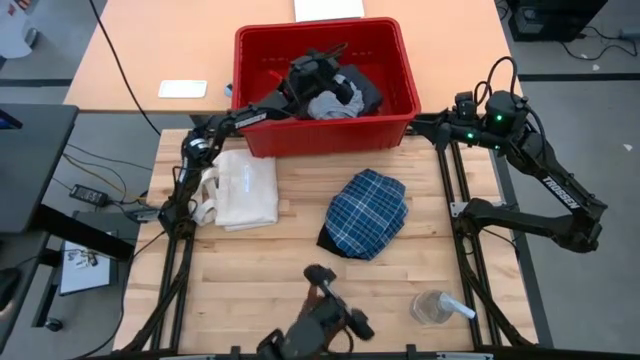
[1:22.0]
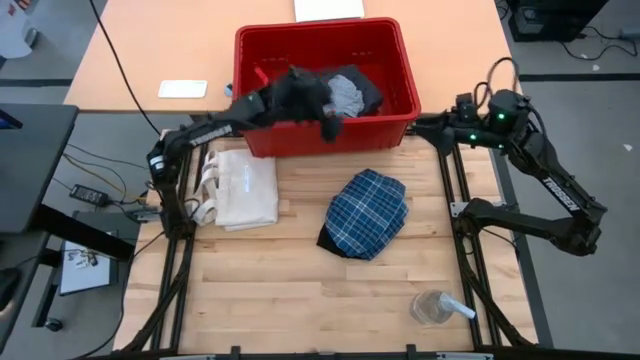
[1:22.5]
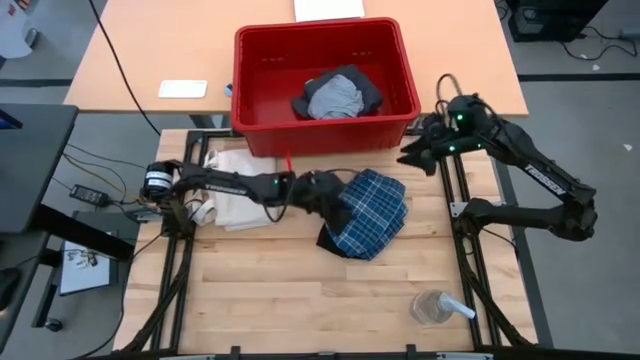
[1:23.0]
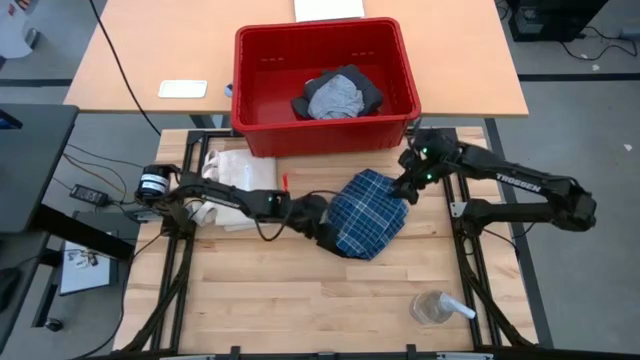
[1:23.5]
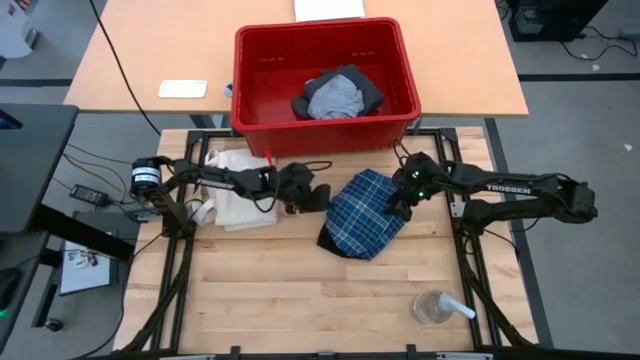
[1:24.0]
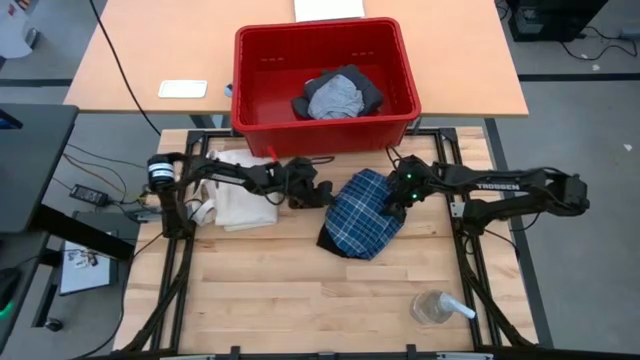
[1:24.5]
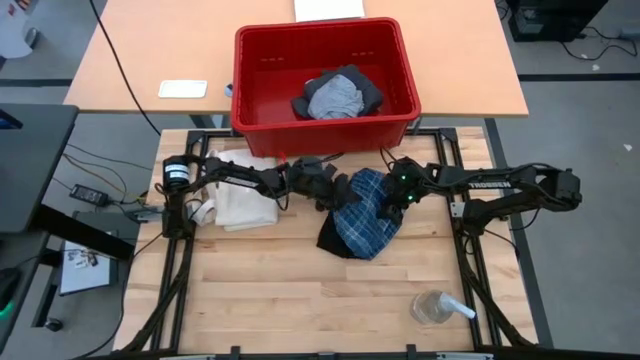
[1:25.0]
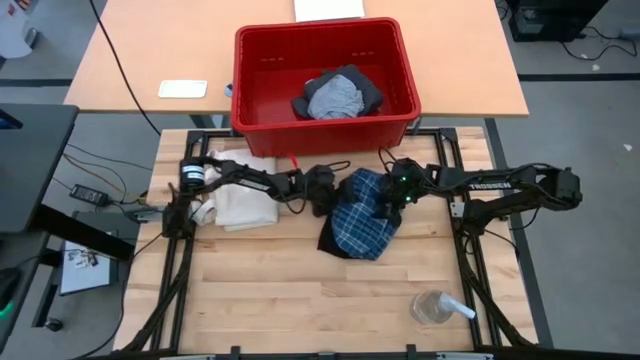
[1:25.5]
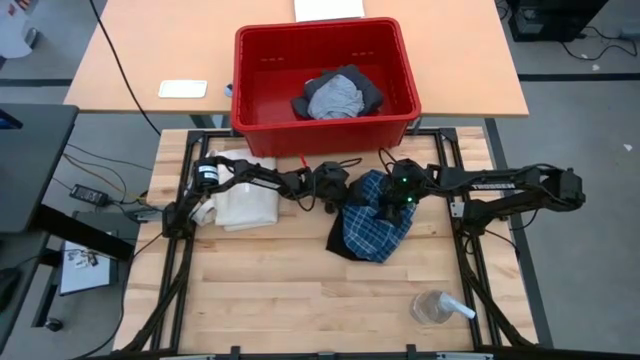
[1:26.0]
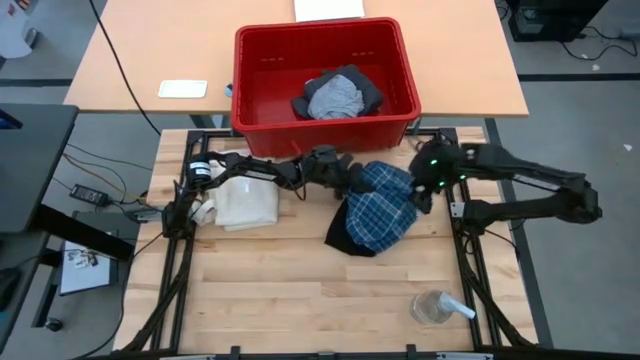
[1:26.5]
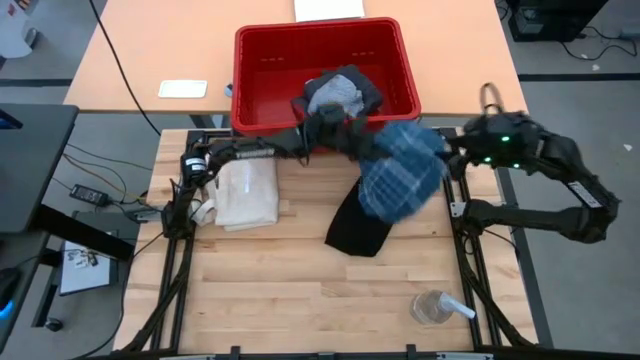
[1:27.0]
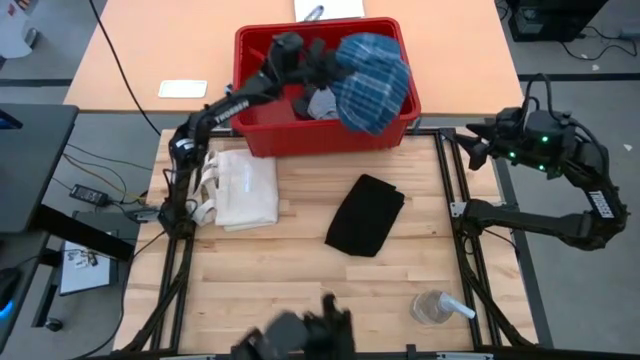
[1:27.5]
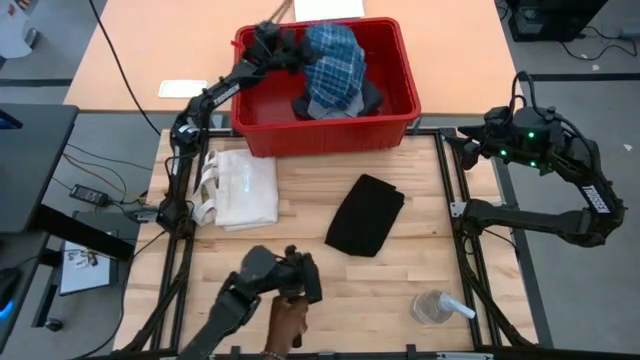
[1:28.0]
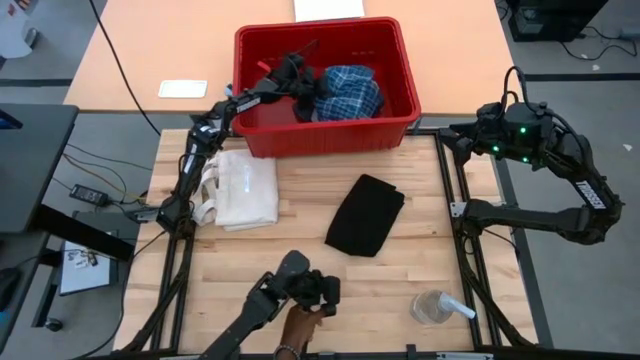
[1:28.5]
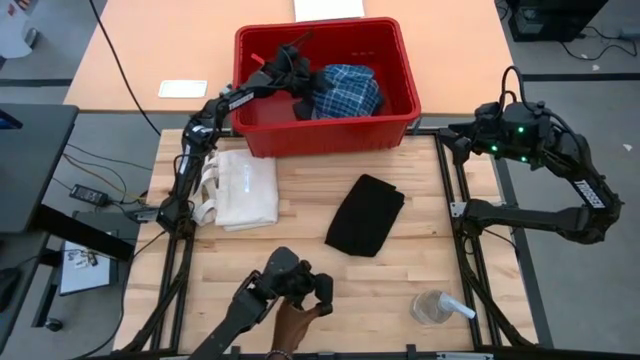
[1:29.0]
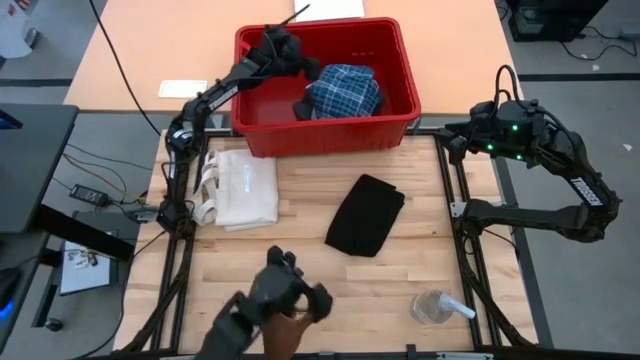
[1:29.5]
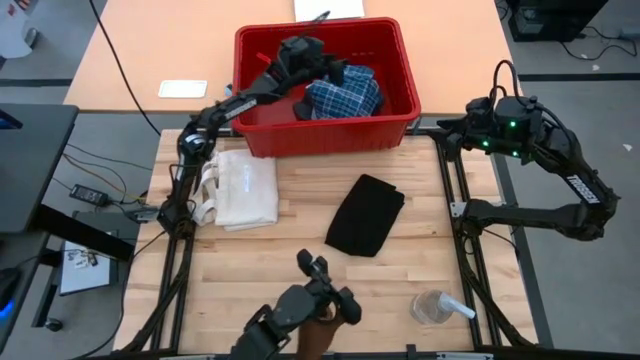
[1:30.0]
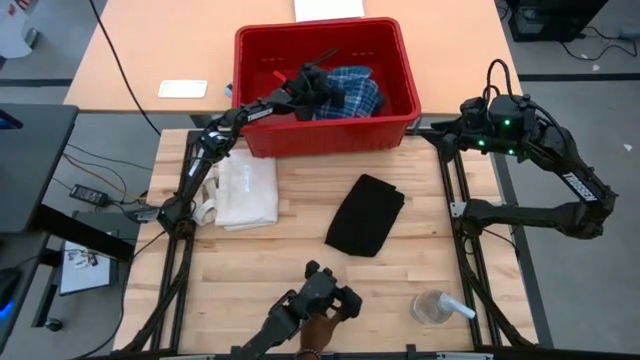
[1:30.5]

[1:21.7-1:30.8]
Task: Fold laundry
Put the blue shirt into the red laundry bin

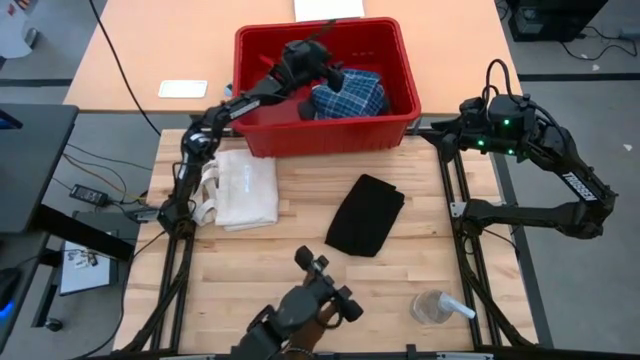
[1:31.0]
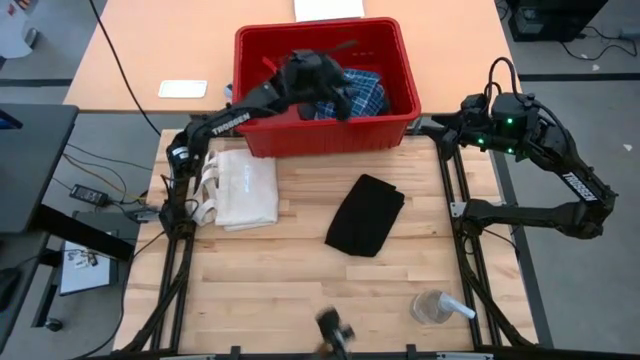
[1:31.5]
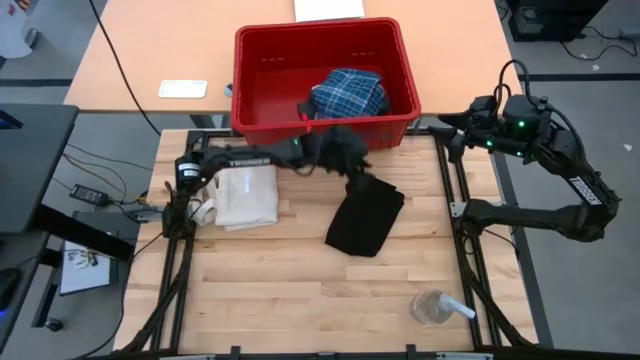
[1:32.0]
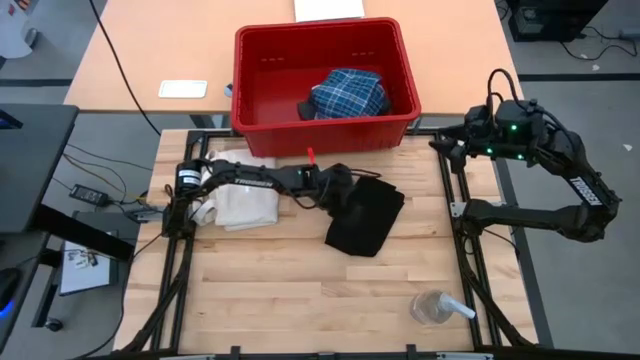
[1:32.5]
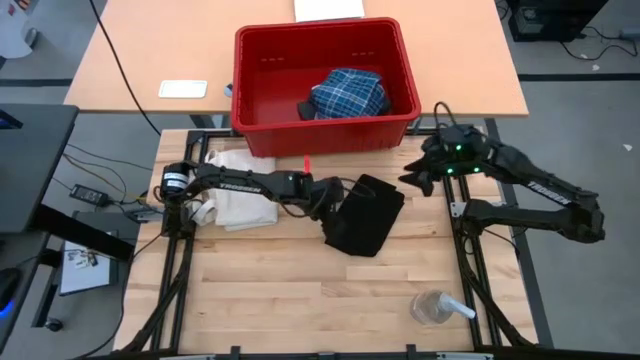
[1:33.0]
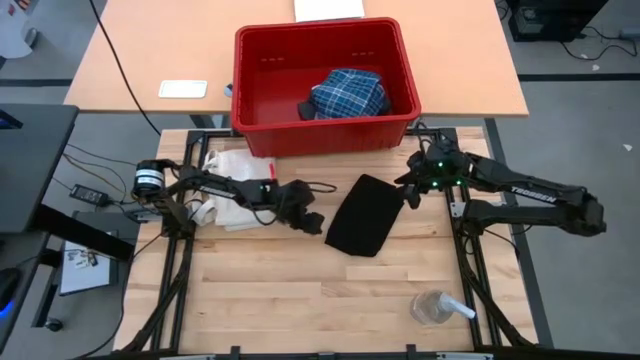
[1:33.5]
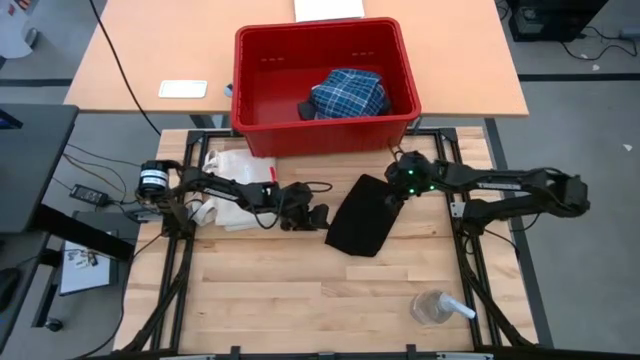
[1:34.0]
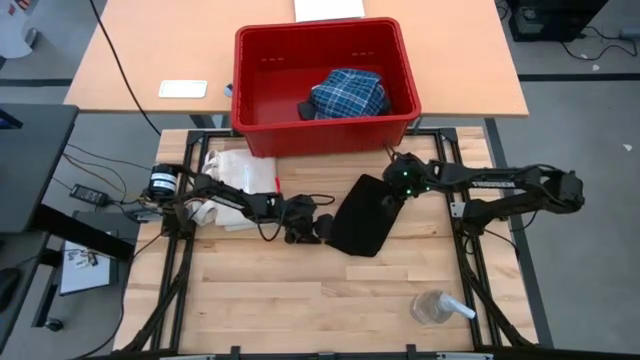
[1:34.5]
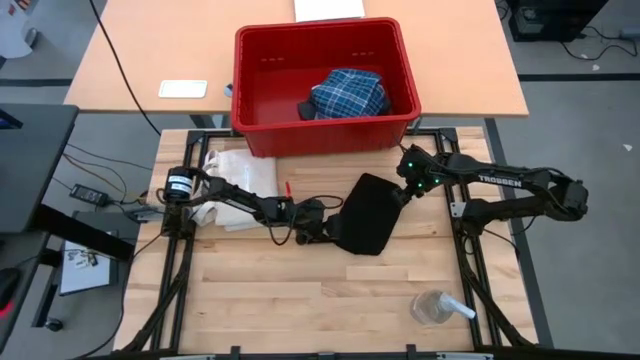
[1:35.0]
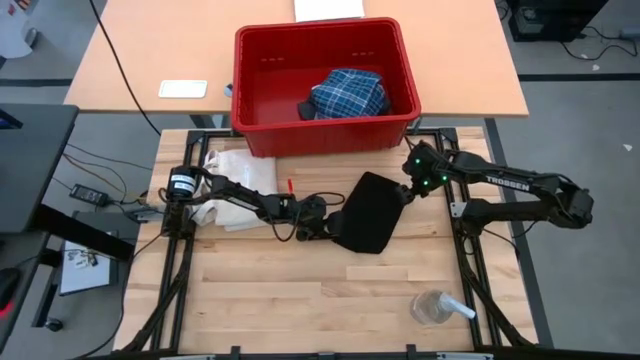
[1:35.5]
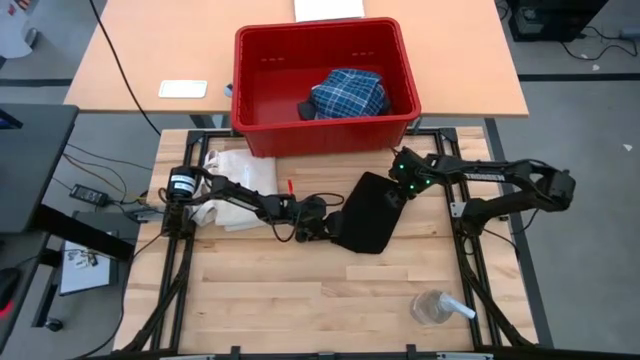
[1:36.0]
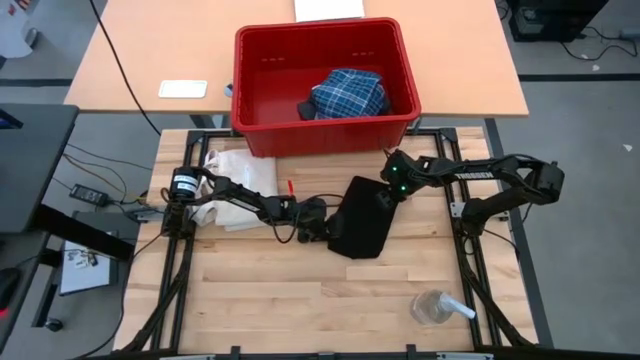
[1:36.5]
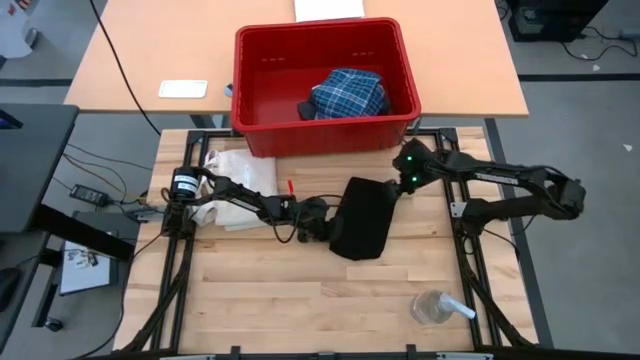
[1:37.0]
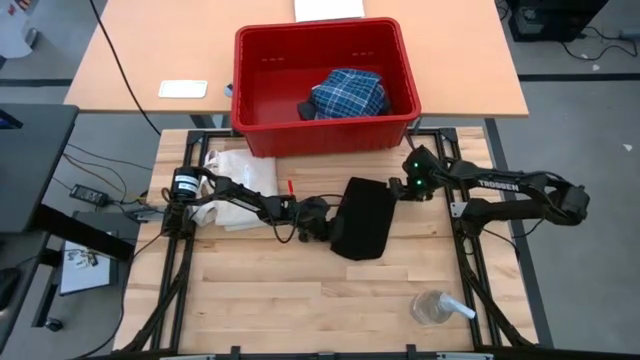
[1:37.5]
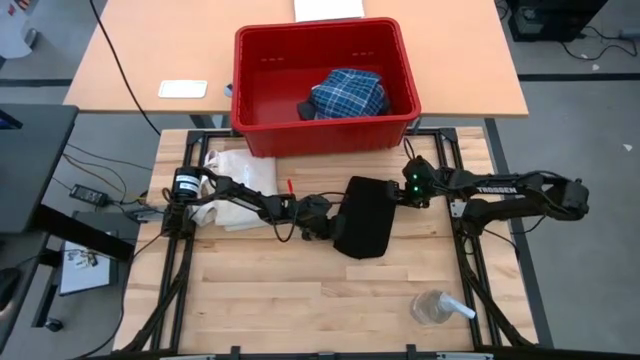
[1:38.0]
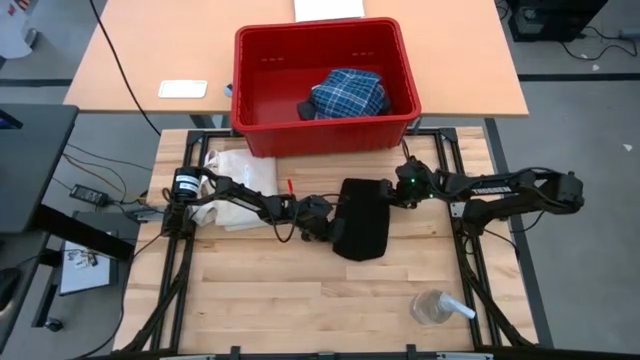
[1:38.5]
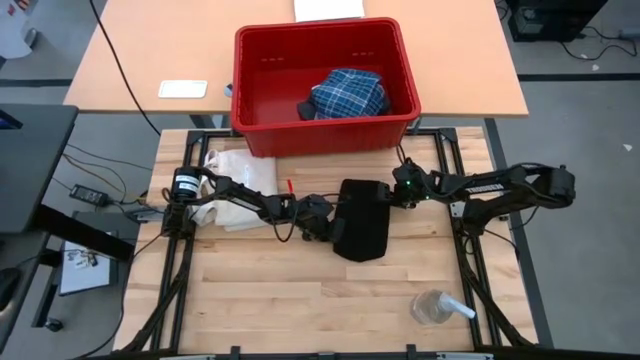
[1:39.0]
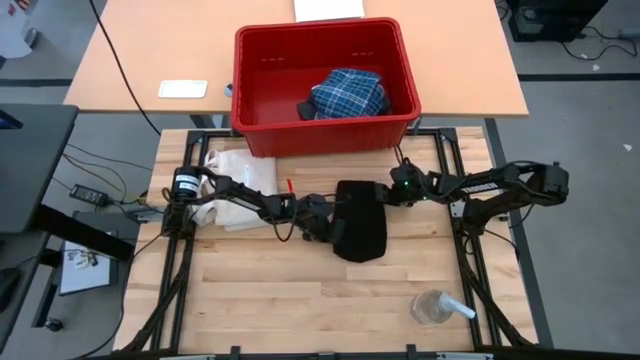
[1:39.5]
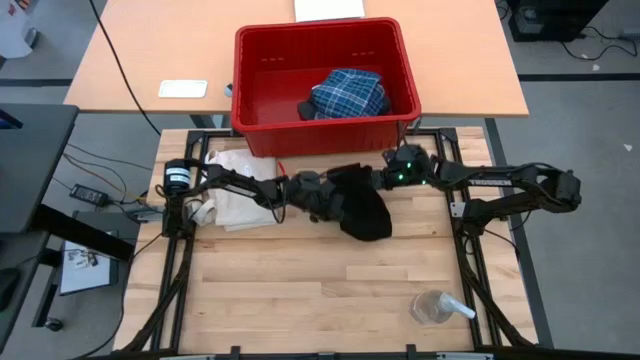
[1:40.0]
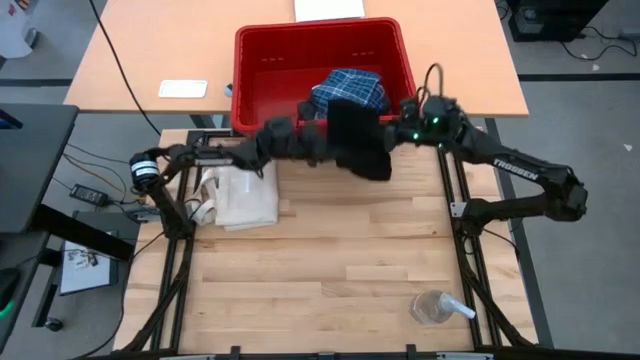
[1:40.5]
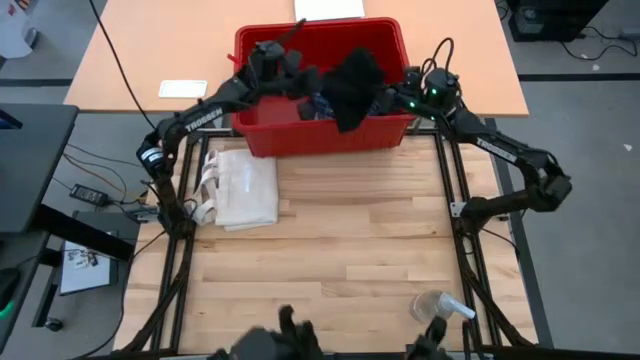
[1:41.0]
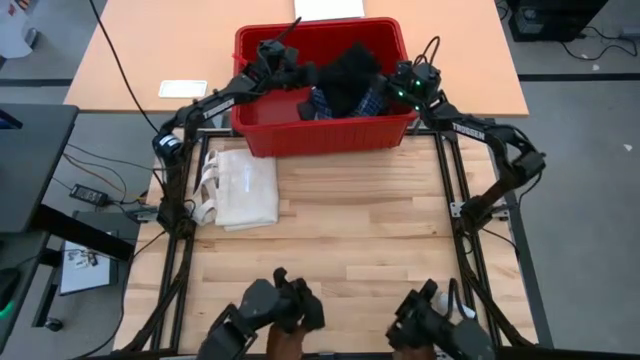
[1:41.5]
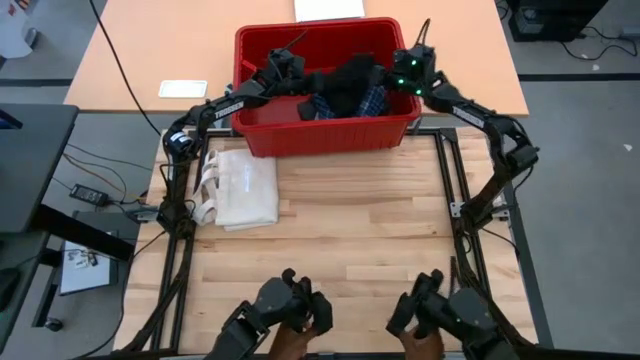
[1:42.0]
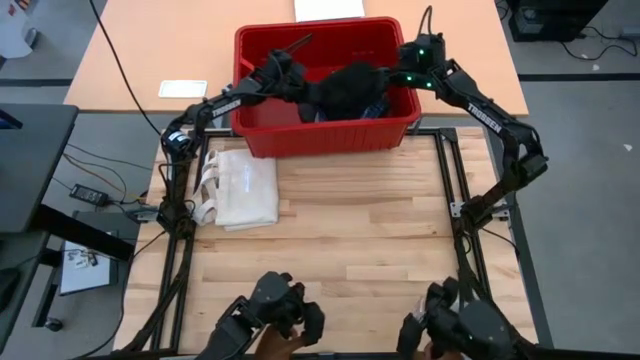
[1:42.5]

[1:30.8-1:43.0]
Put the black shorts into the red laundry bin
